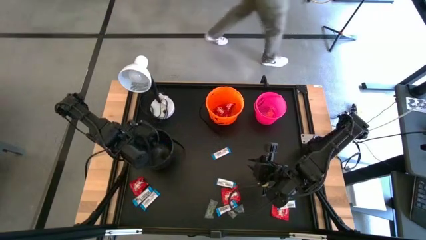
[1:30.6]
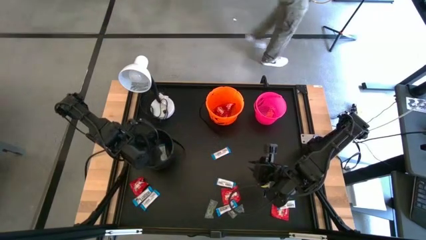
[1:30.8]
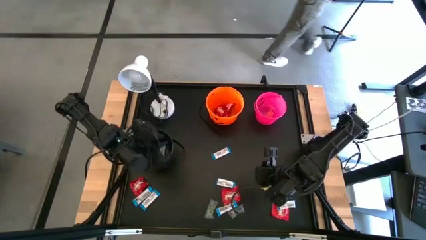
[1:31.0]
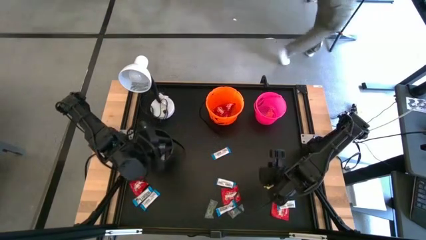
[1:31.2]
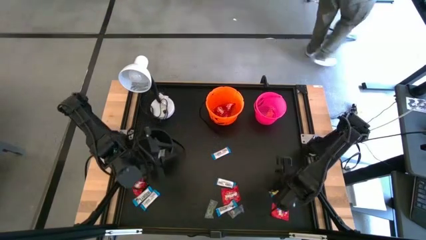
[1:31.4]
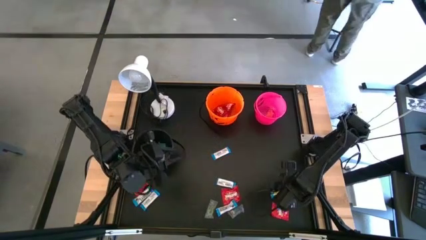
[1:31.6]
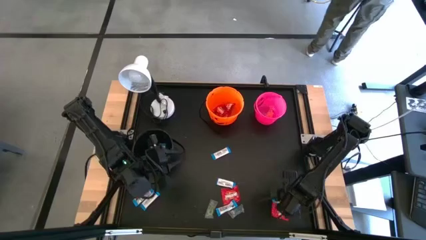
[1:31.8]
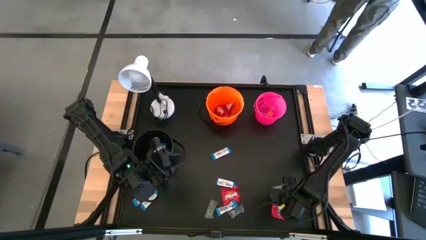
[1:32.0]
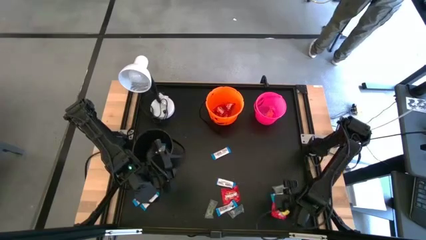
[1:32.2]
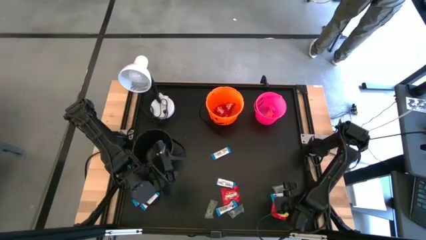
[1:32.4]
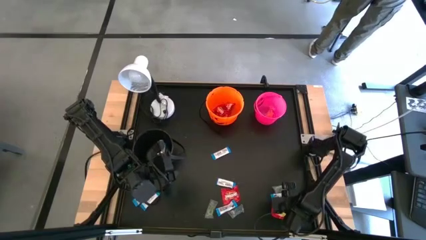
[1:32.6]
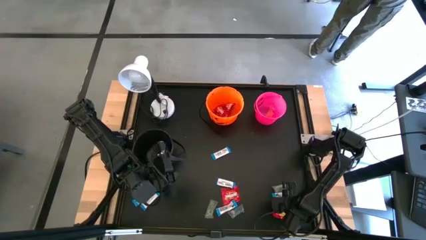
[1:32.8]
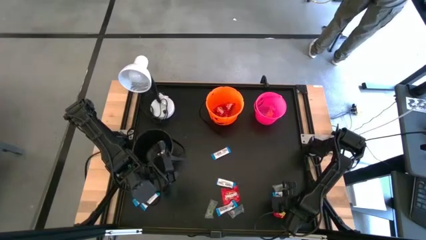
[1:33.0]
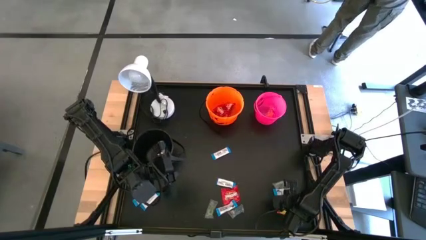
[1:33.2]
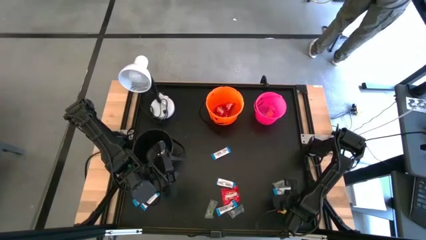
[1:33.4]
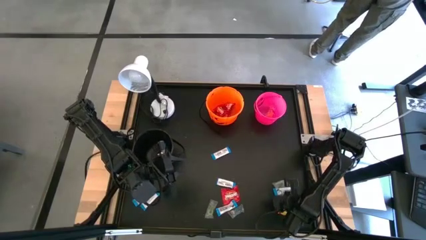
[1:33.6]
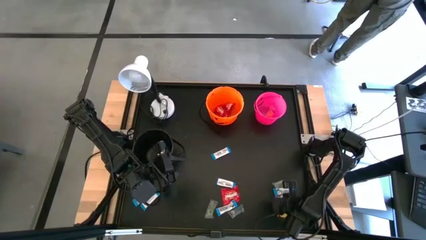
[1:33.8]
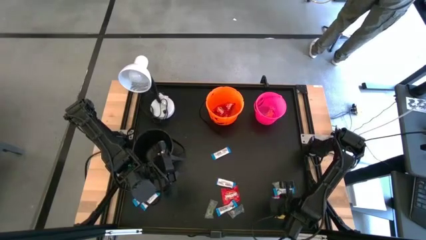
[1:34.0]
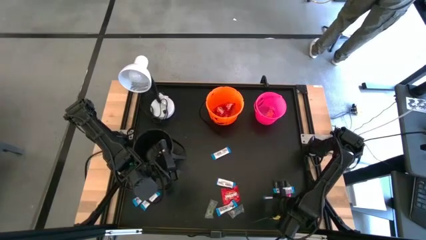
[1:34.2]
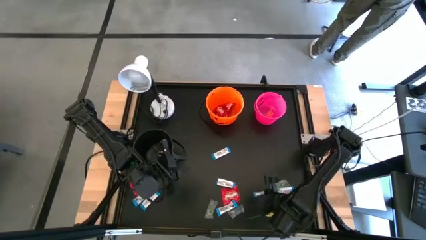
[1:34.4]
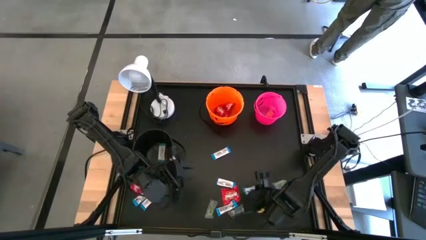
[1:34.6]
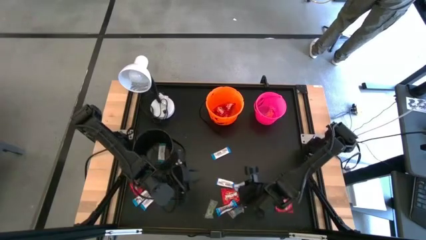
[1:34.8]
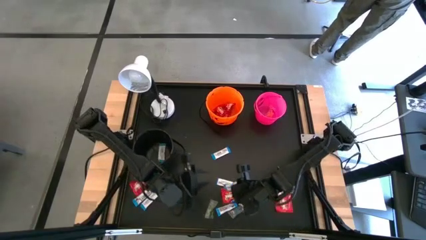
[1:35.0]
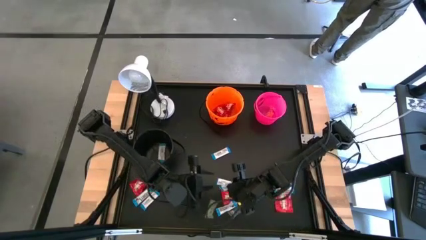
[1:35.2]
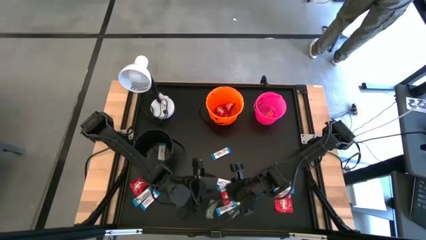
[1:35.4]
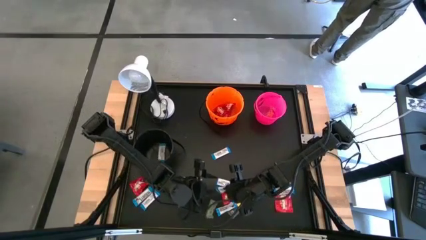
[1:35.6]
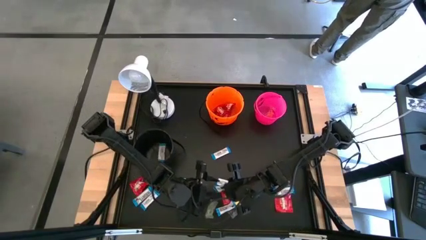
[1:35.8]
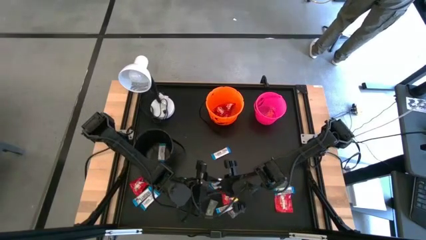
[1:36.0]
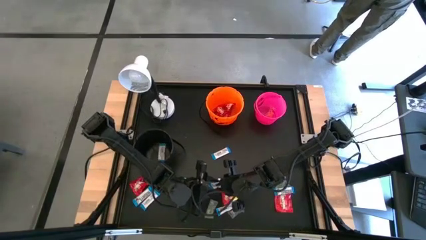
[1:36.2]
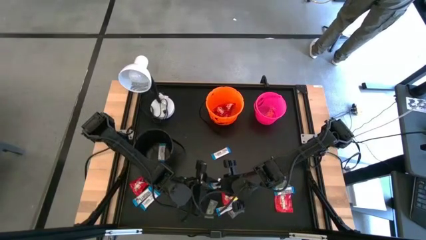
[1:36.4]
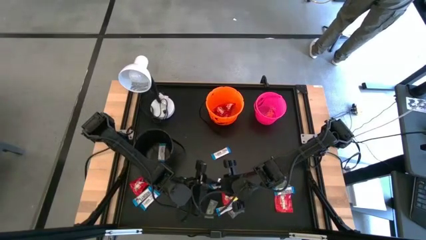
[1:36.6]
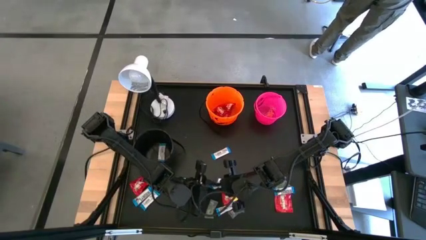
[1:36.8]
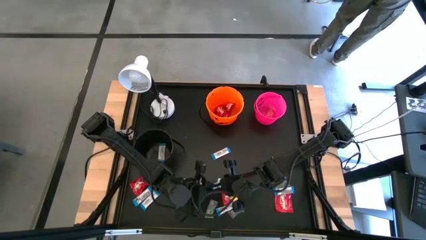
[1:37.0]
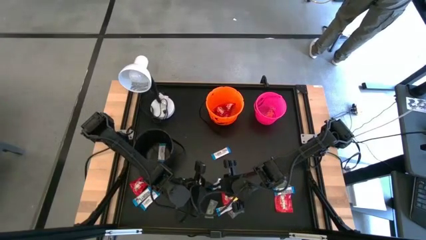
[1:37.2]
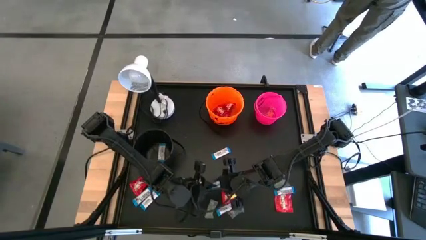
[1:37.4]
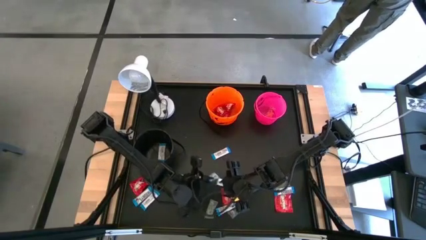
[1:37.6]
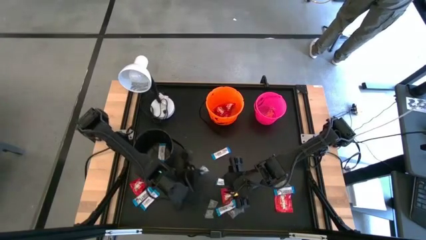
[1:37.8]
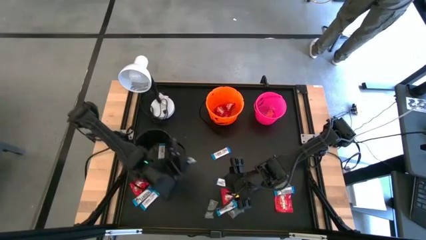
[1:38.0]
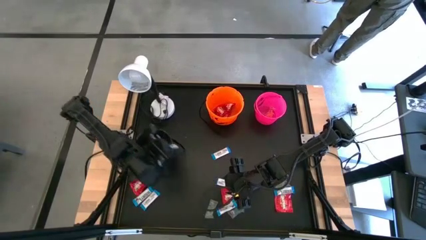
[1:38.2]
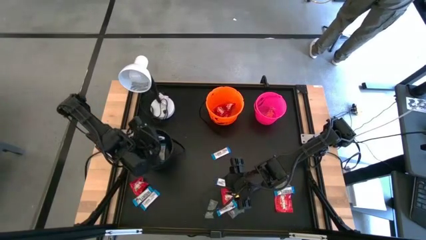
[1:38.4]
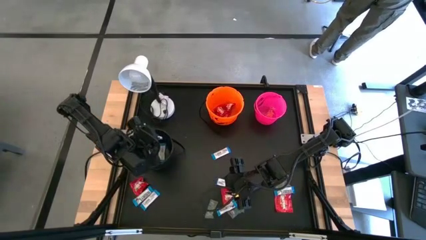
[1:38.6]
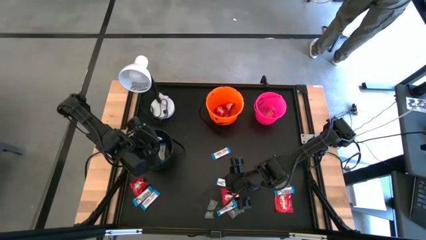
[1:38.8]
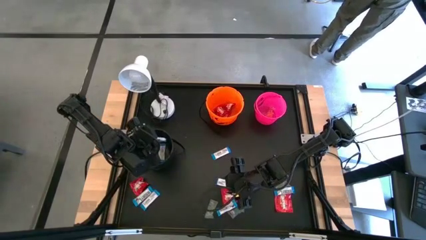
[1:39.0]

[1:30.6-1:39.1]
Task: Sort candy
Put the white candy into the black bucket

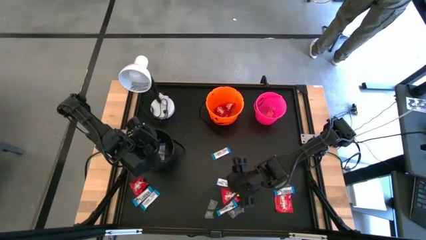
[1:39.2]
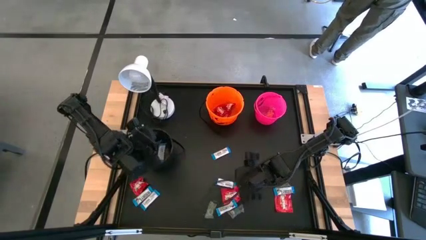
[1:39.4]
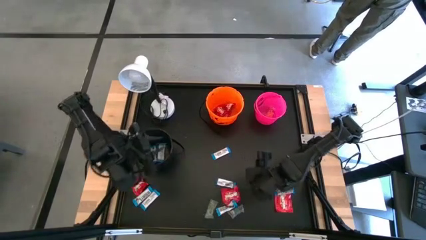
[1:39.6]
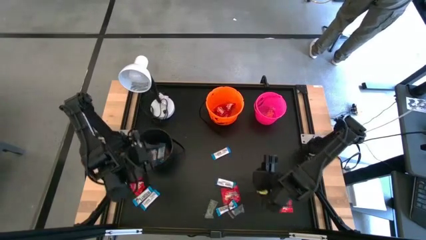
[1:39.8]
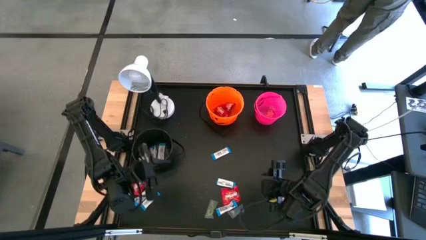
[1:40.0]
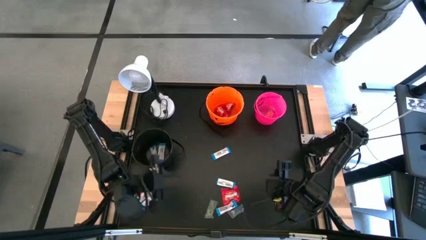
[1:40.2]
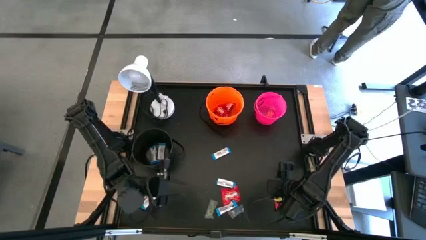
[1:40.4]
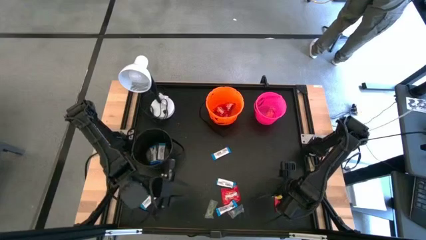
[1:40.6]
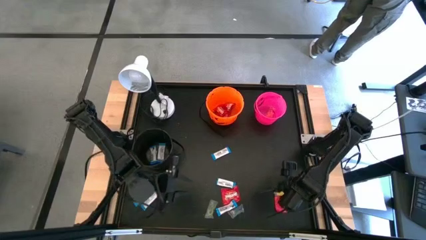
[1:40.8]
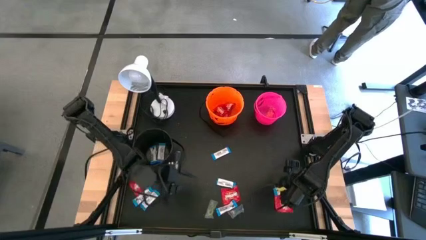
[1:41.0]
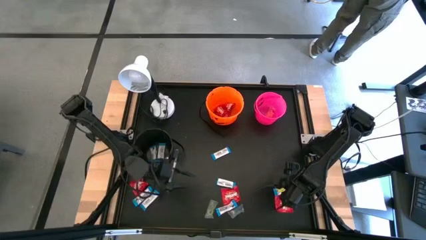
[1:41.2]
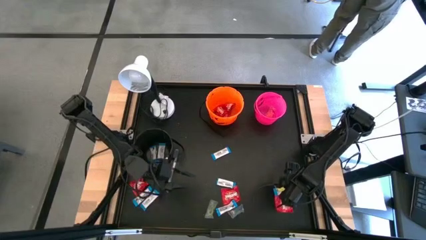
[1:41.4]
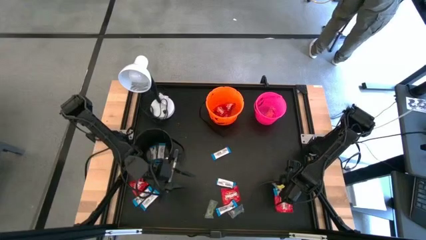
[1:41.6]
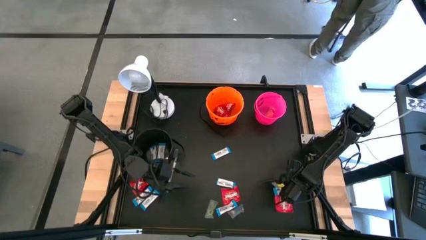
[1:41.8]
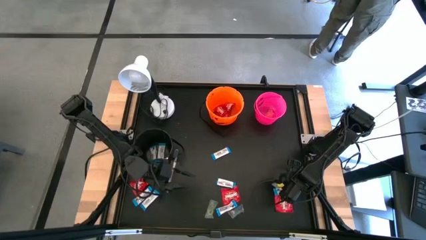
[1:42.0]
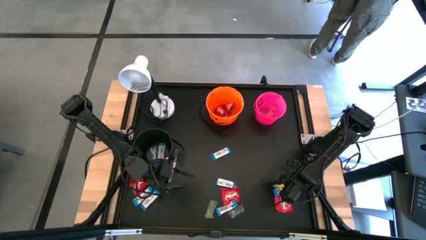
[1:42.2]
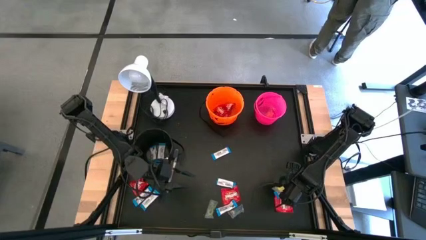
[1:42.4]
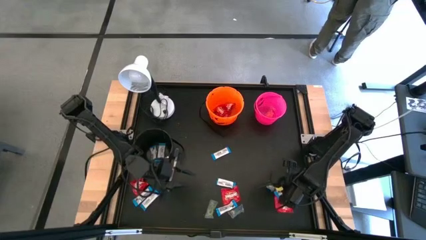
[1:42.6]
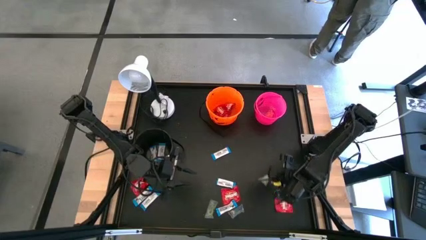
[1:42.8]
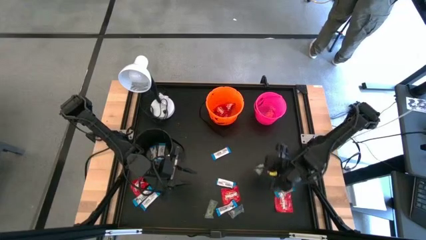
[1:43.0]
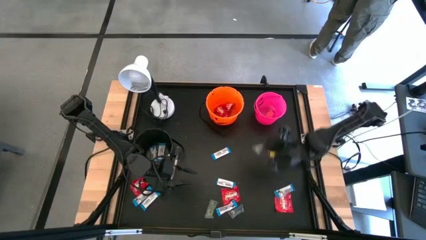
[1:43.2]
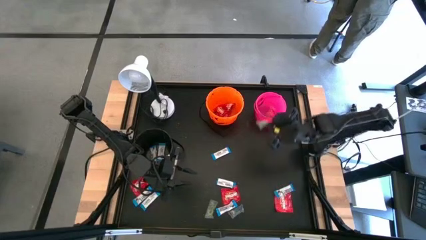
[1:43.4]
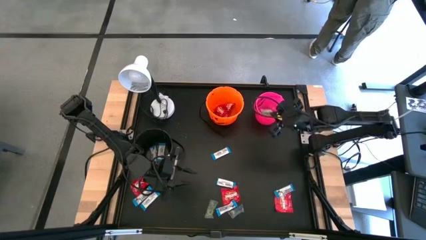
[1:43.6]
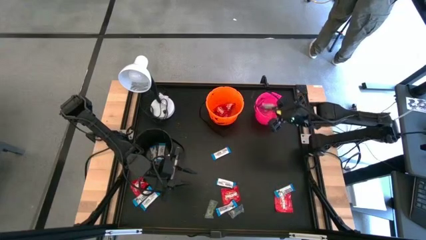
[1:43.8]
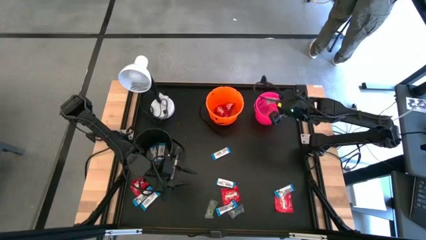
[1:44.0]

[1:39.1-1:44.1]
Put the green candy into the pink bucket

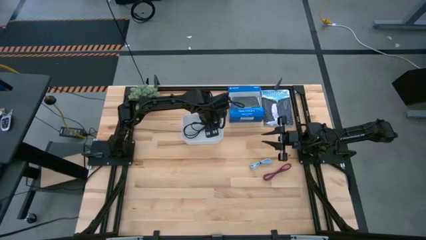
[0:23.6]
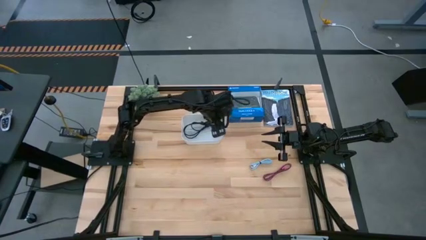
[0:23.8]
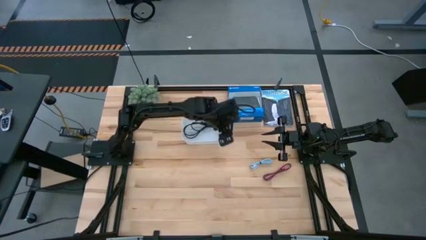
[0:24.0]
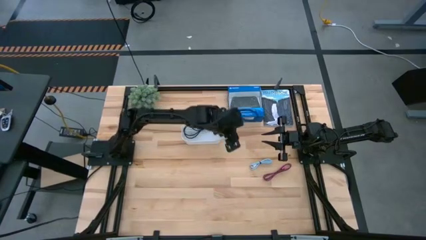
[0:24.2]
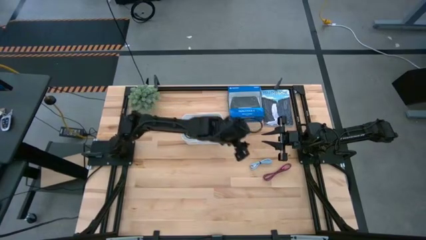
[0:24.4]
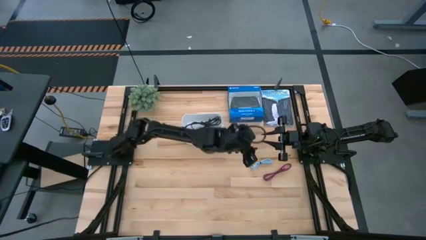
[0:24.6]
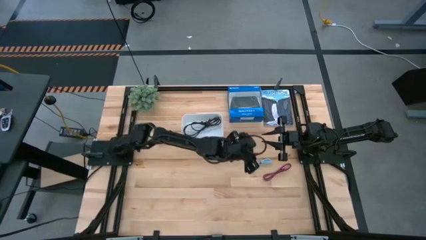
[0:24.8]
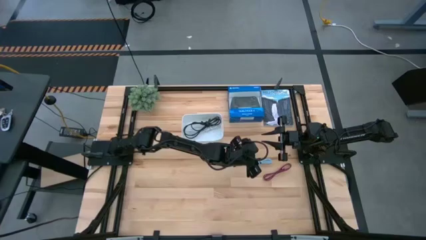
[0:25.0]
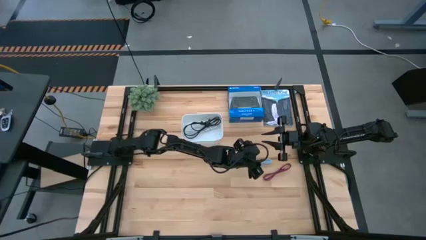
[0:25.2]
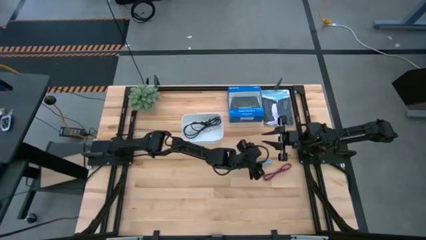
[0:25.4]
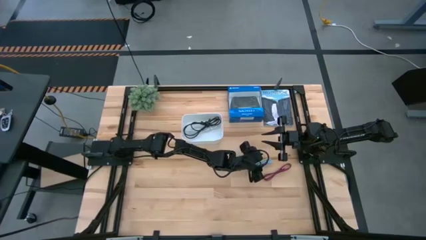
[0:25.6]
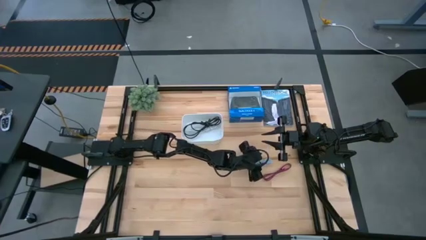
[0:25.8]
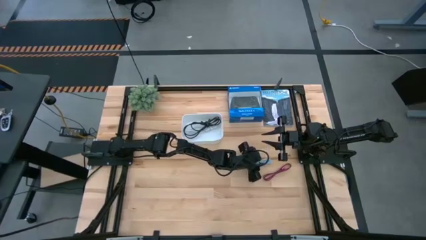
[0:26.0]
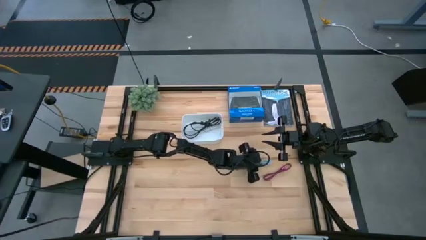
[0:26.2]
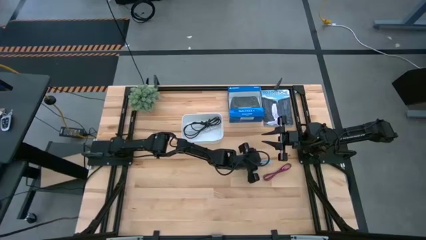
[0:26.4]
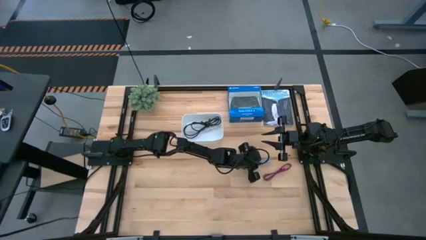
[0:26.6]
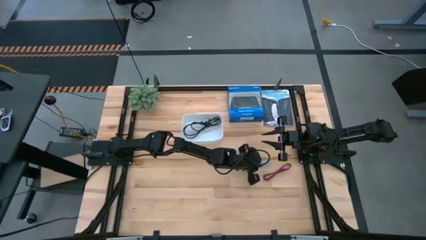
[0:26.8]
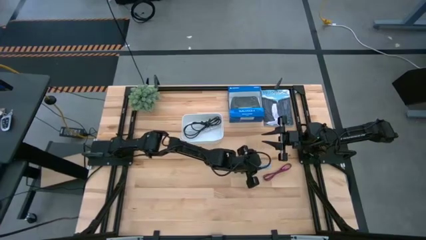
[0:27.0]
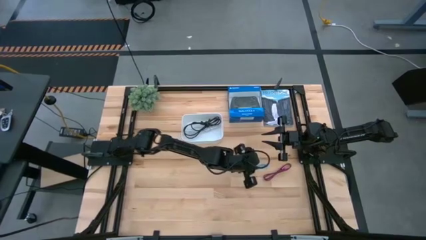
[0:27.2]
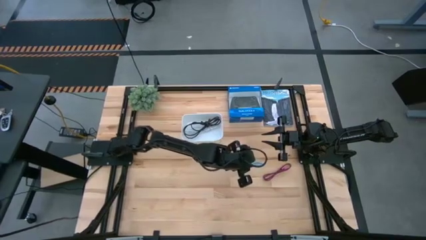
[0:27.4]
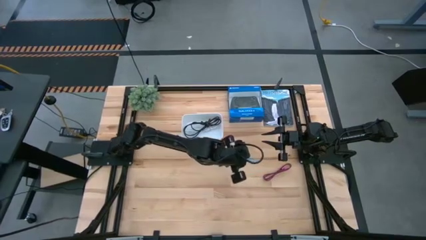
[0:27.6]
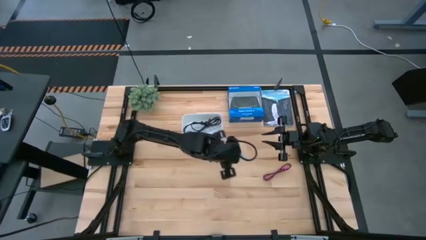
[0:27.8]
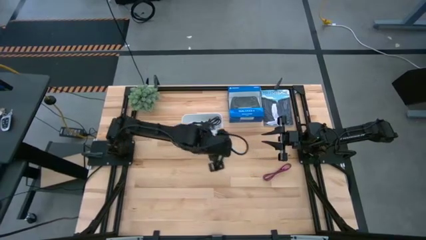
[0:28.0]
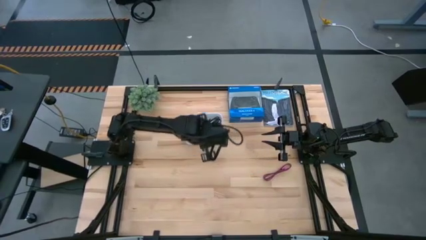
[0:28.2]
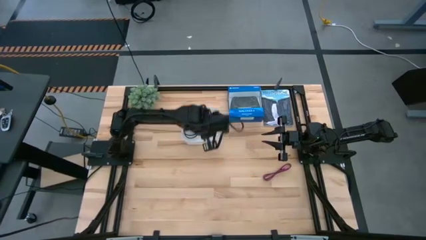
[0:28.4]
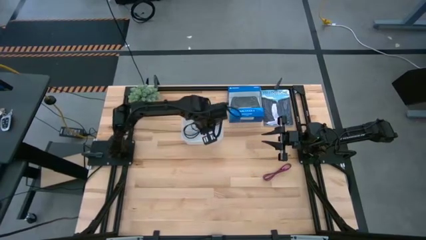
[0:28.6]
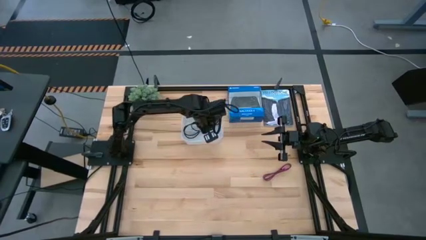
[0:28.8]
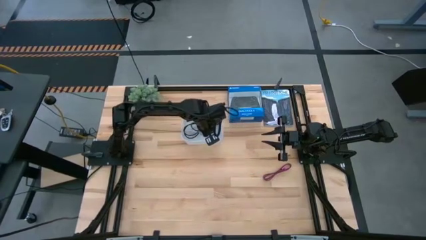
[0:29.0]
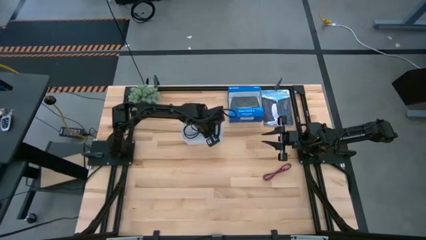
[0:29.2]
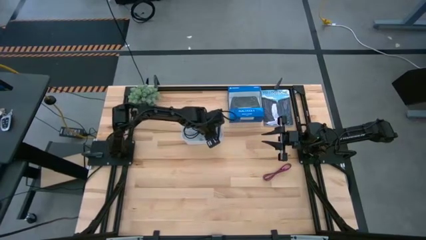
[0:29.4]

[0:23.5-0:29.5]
Task: Pick and place USB-C Cables
Put the blue charger cable into the white bin
